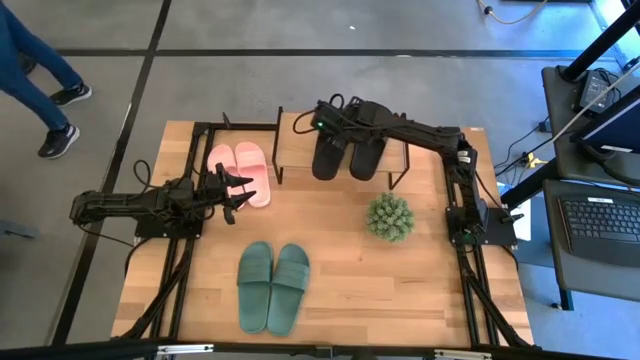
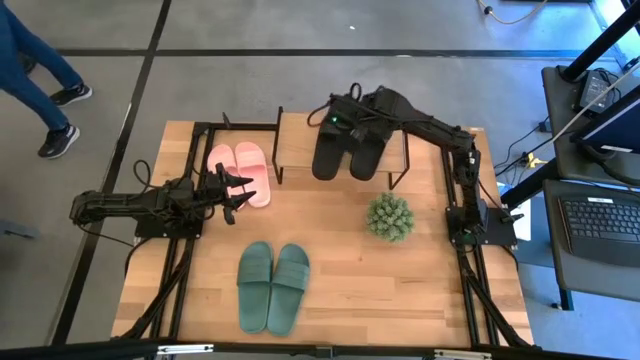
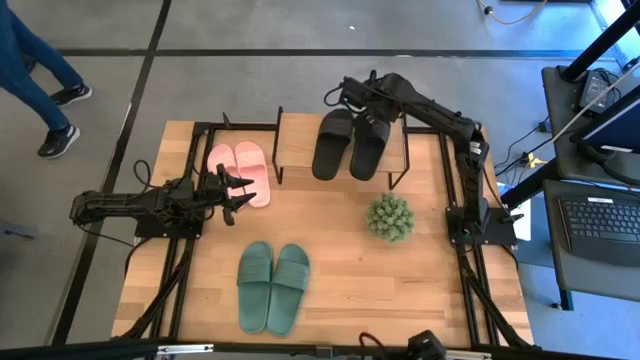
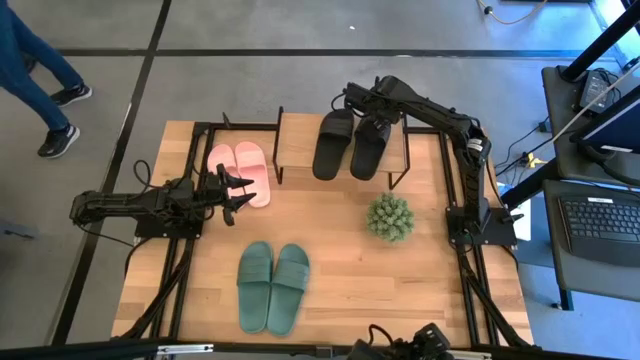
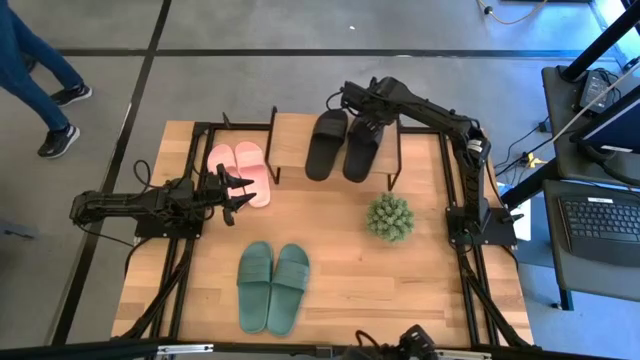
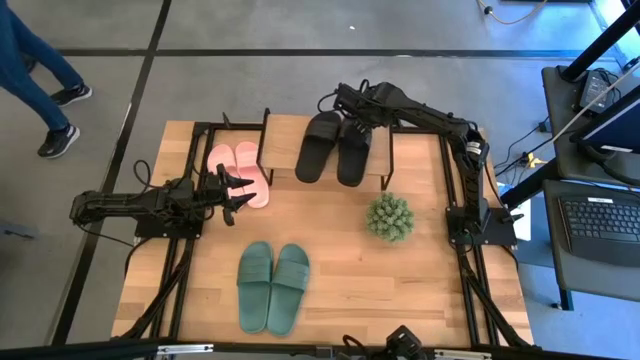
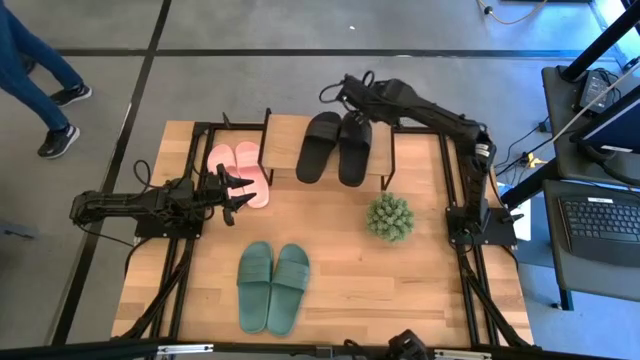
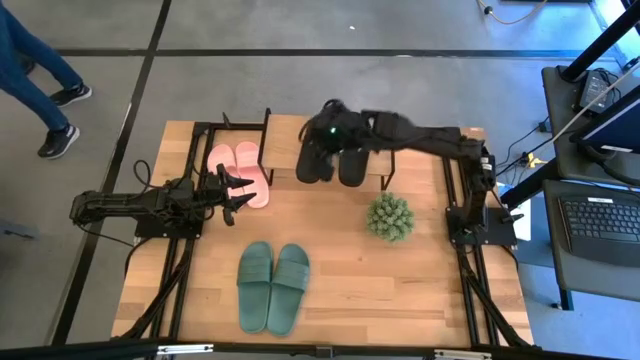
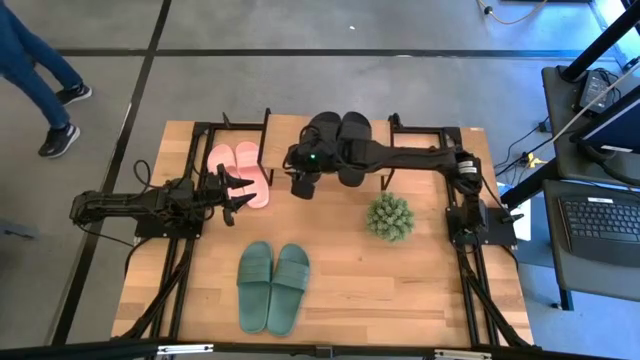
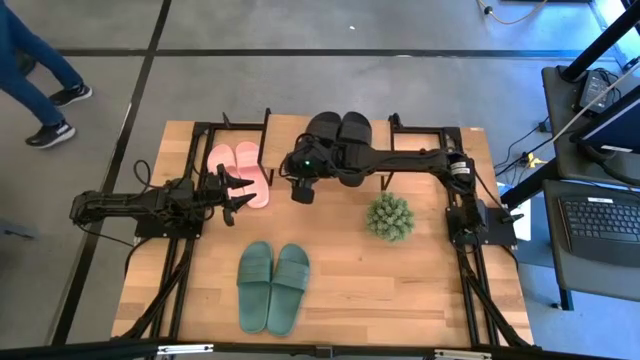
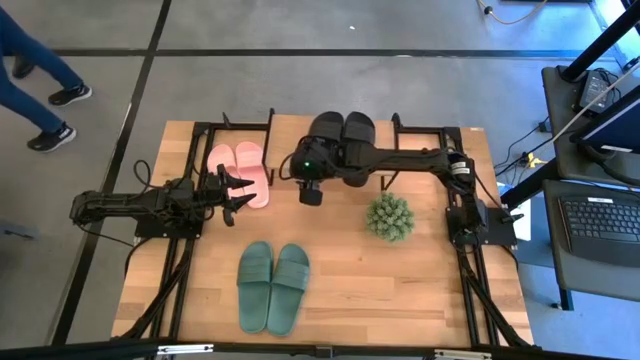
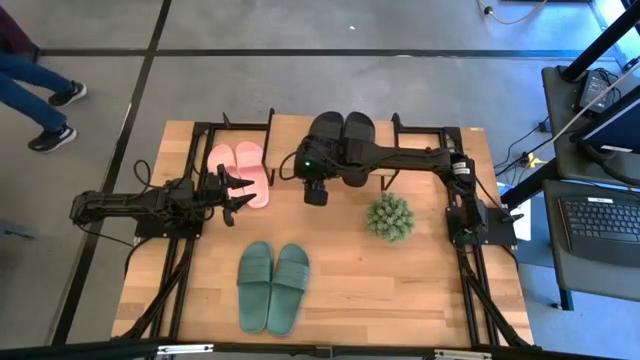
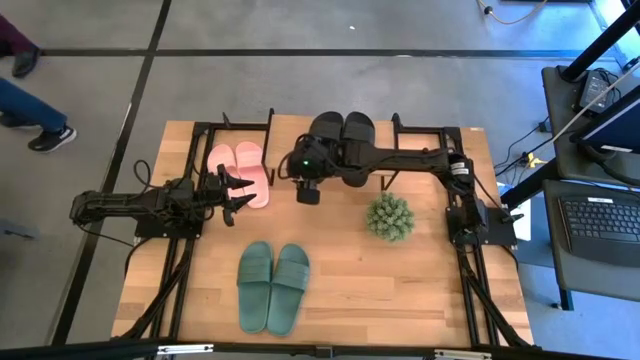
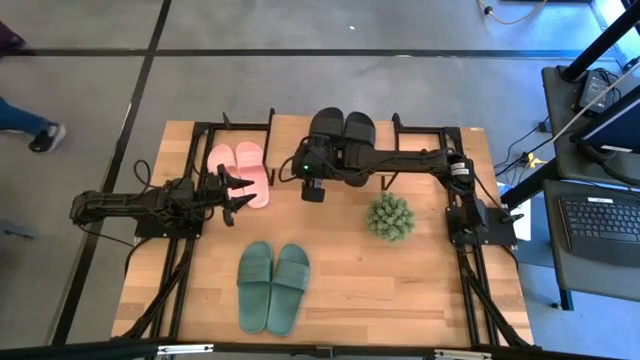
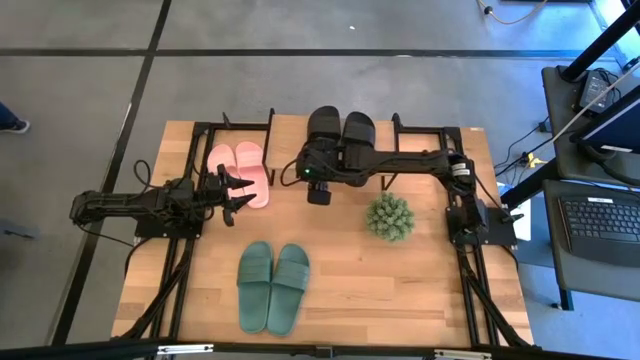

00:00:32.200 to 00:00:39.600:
Task: Pick and place slides into the shelf
Adjust the black slides on the shelf

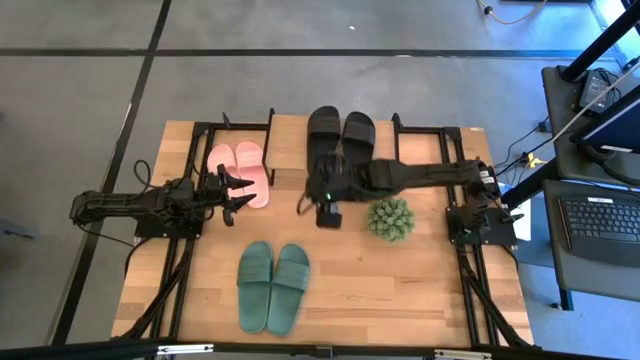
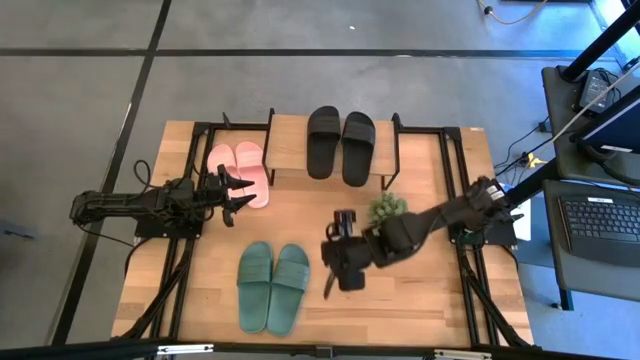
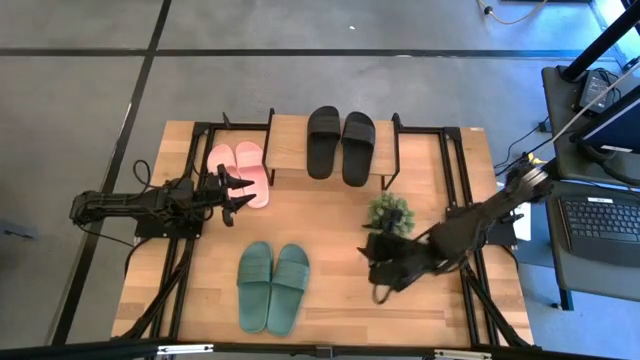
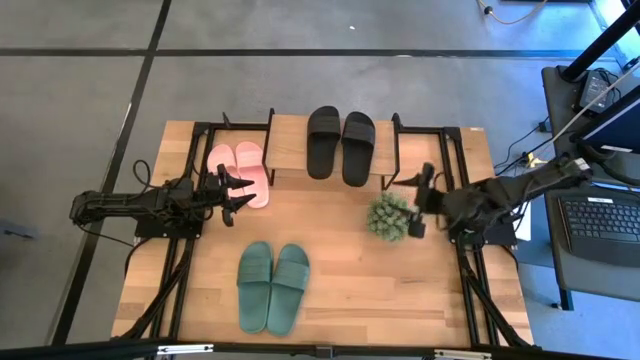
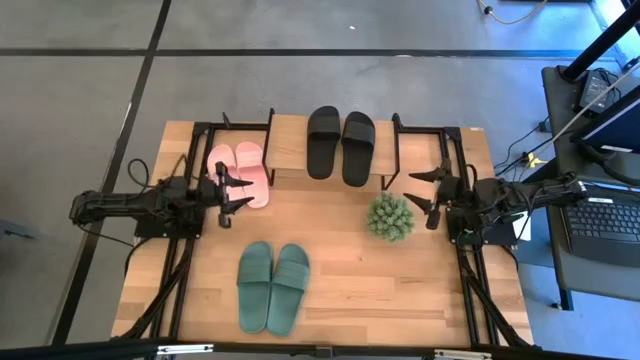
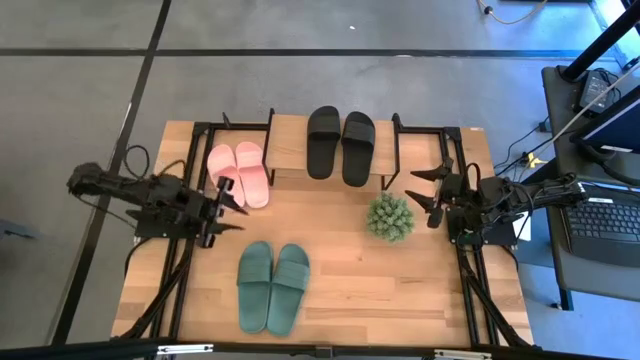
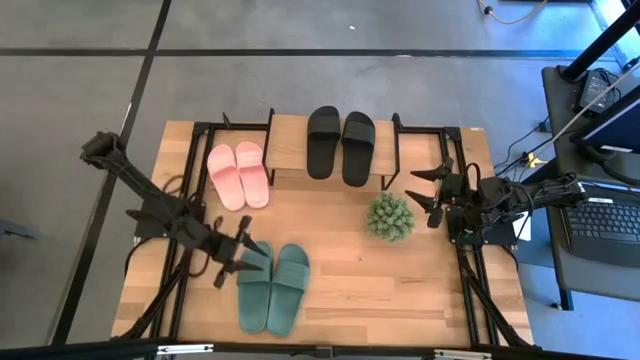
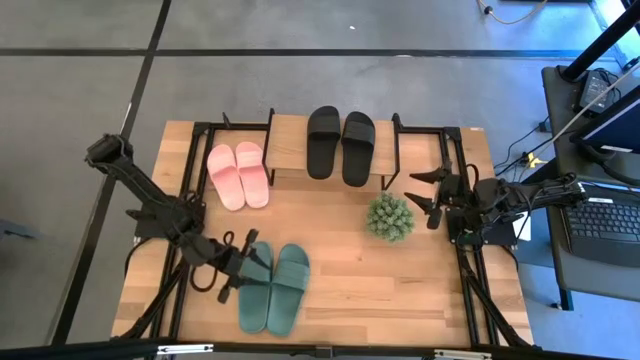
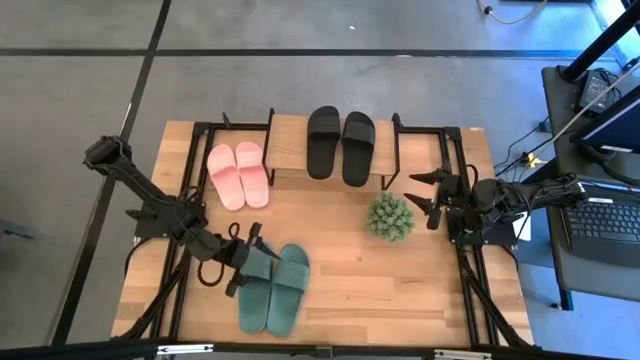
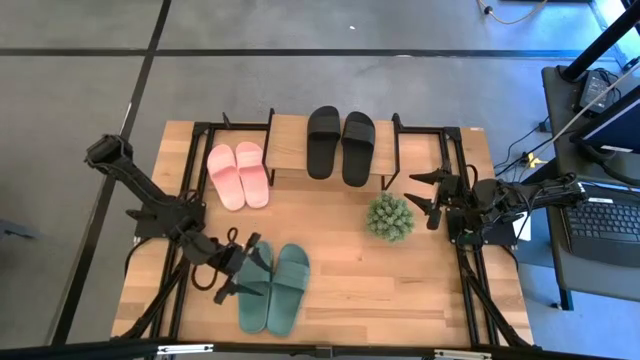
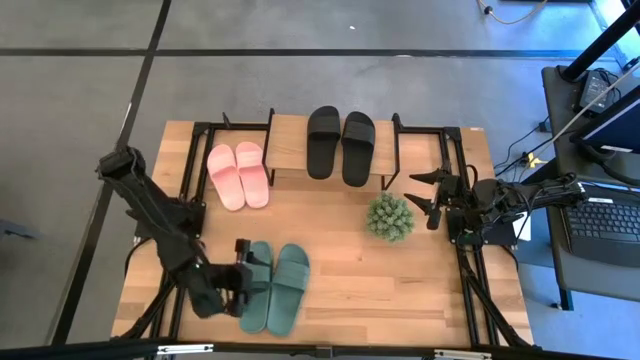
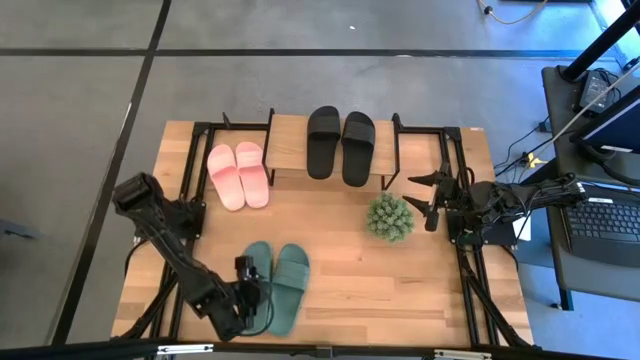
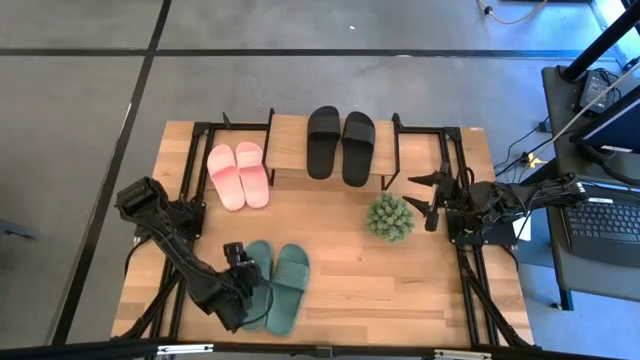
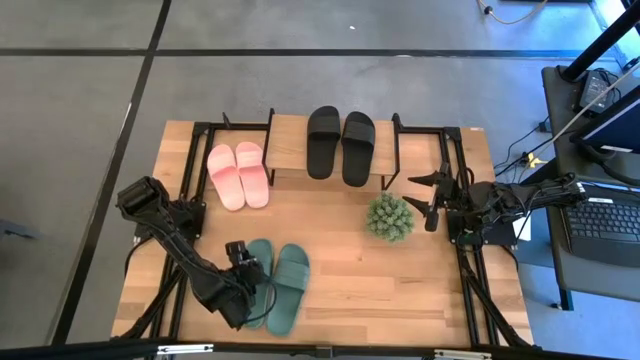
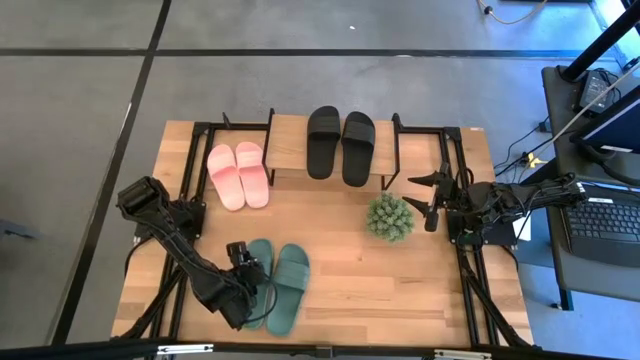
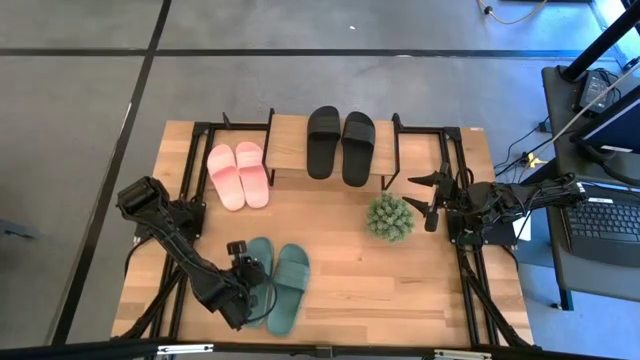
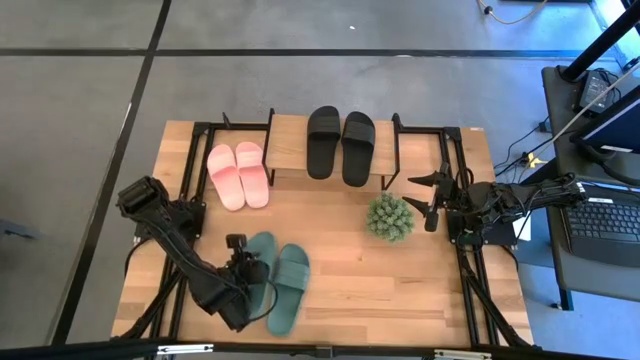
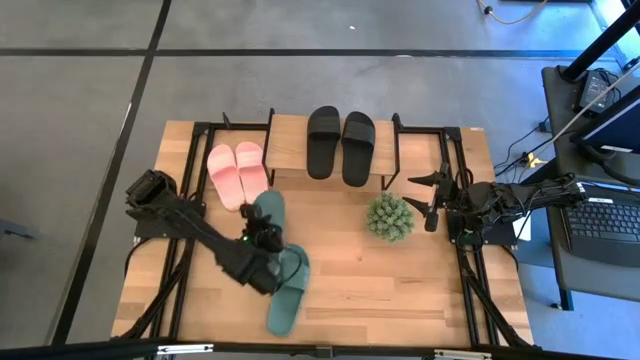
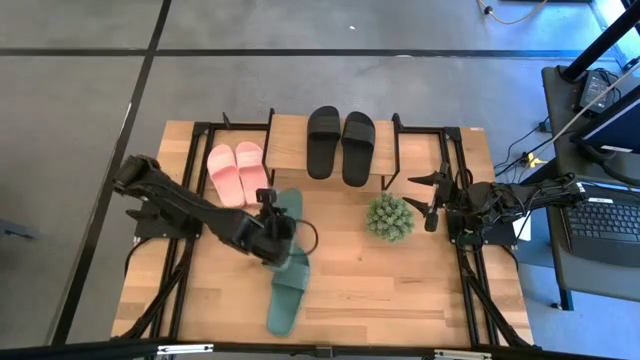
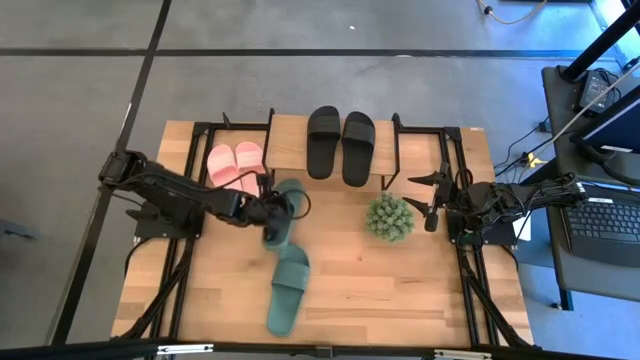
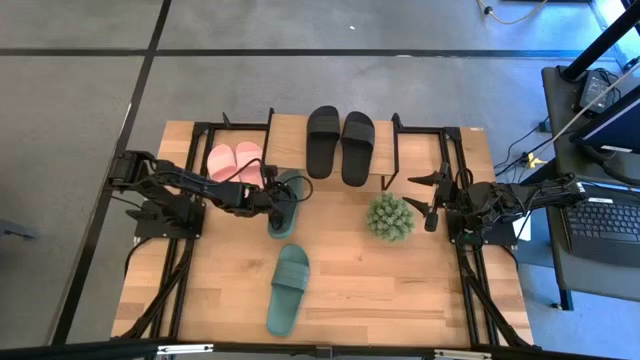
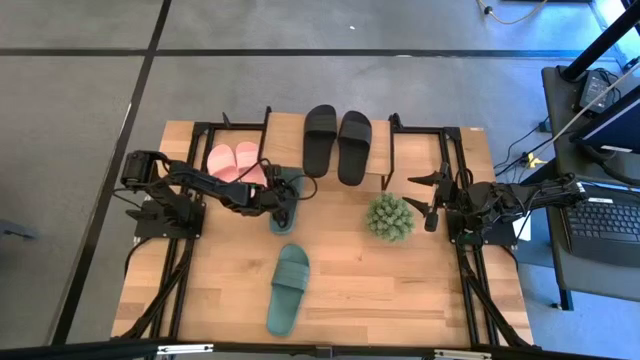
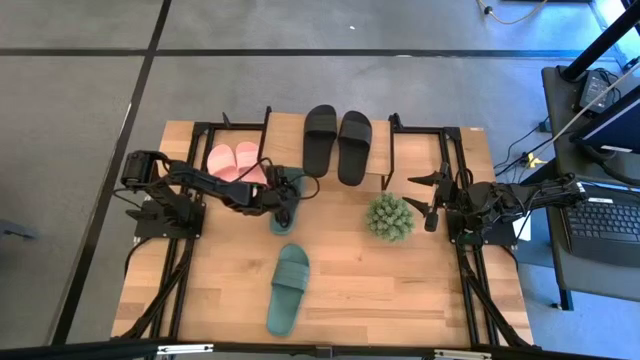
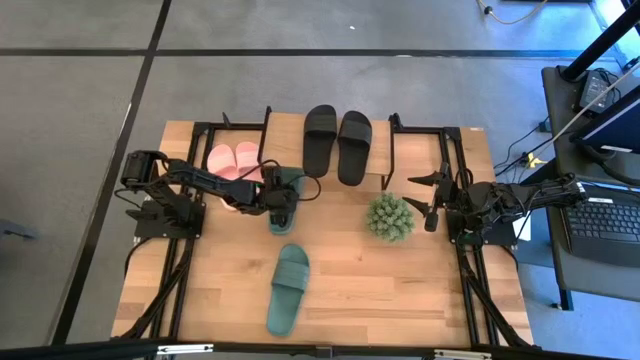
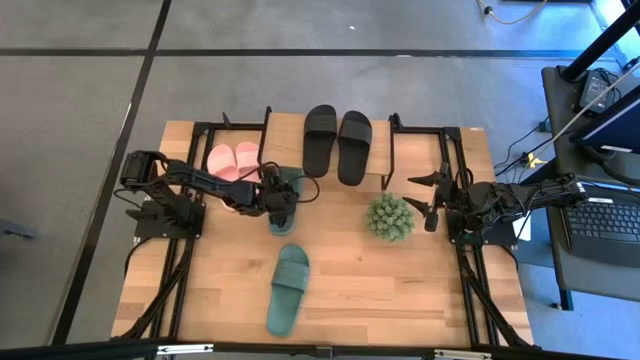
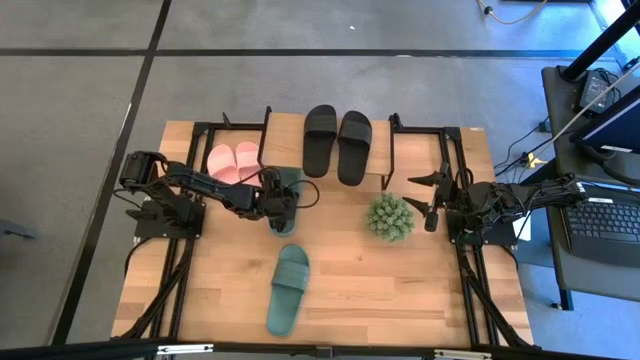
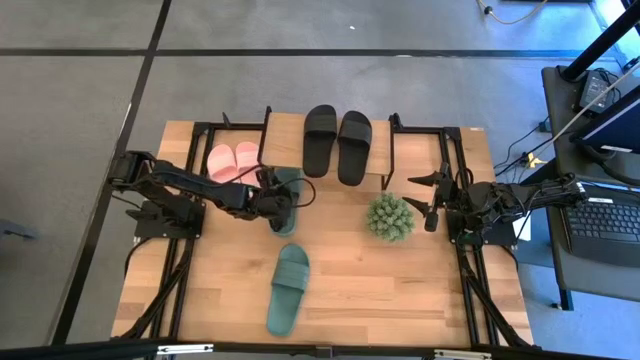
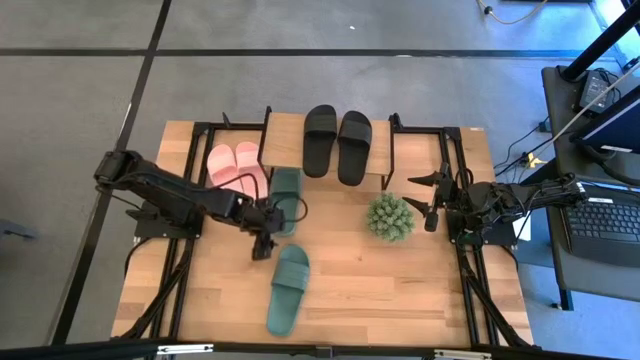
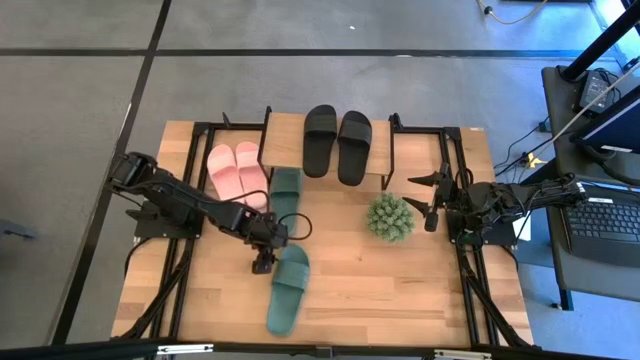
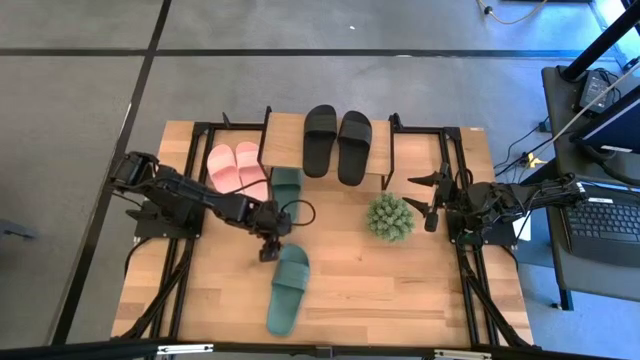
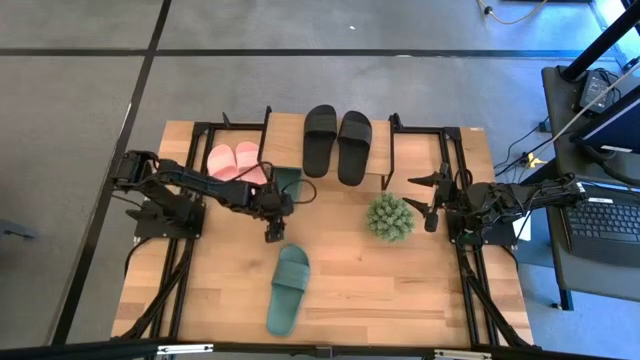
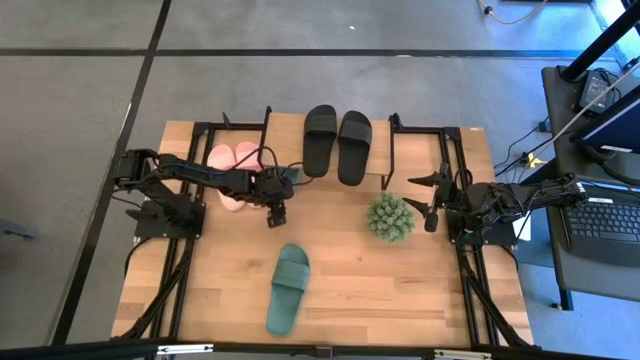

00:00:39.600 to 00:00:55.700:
Put the left green slide under the shelf
